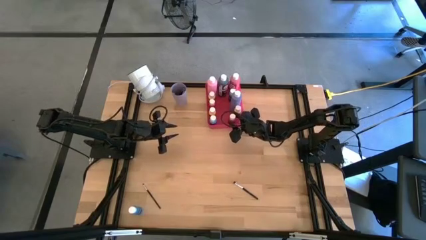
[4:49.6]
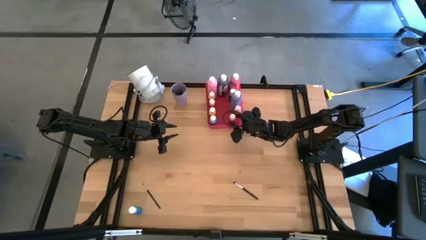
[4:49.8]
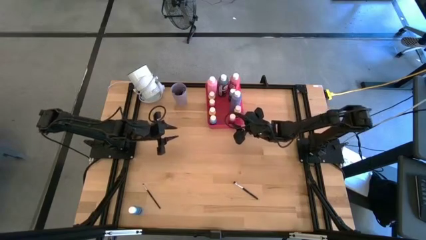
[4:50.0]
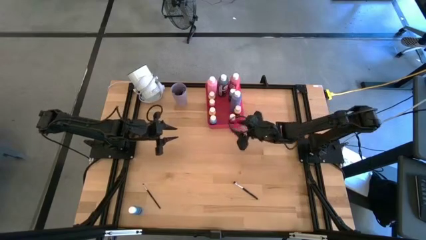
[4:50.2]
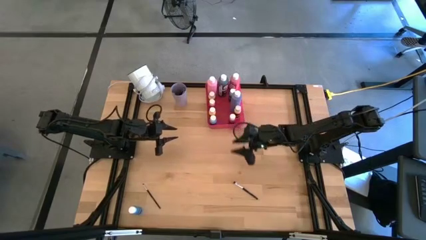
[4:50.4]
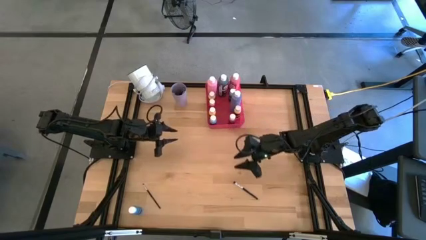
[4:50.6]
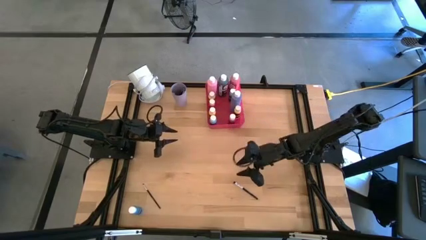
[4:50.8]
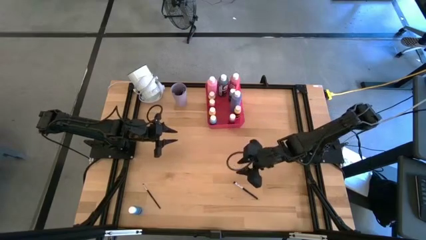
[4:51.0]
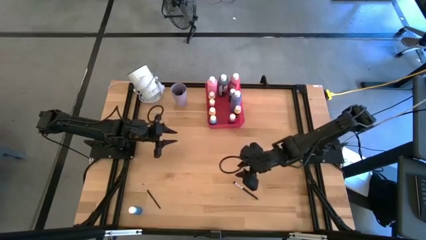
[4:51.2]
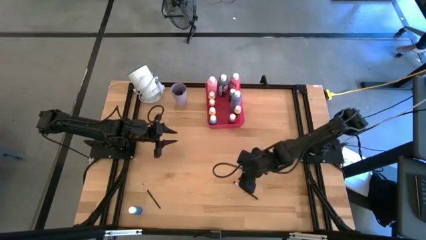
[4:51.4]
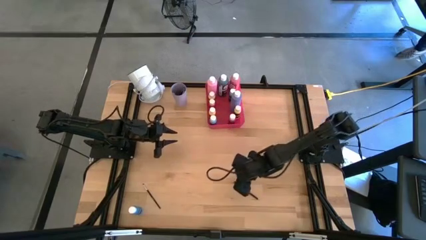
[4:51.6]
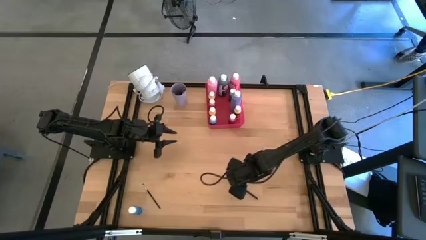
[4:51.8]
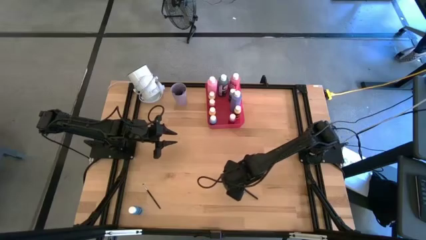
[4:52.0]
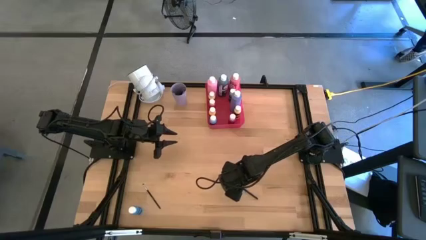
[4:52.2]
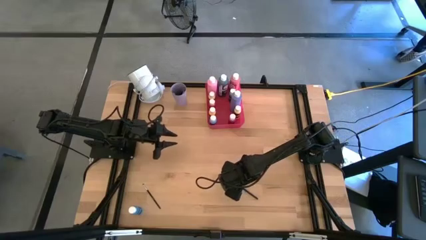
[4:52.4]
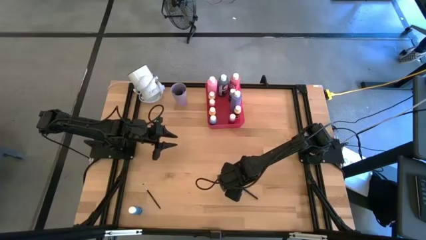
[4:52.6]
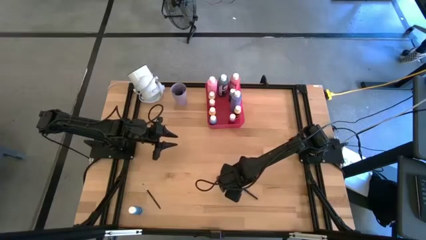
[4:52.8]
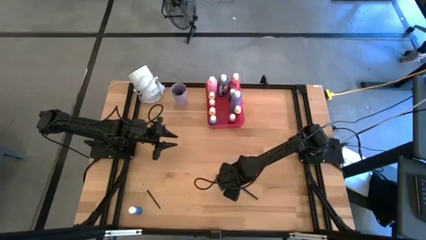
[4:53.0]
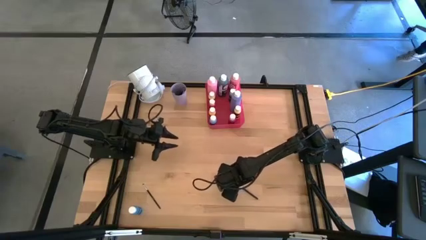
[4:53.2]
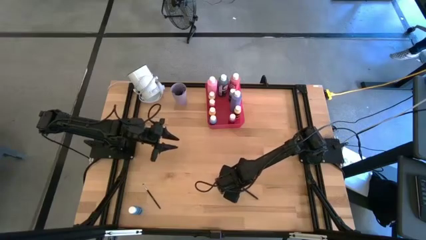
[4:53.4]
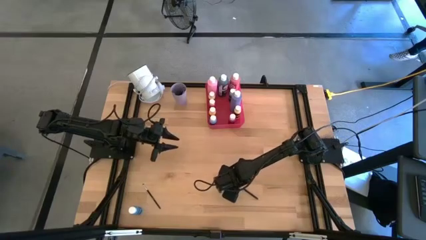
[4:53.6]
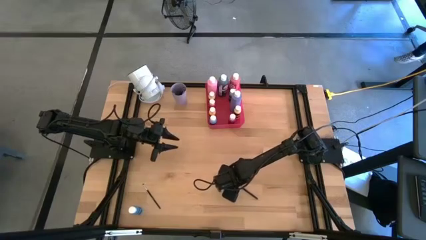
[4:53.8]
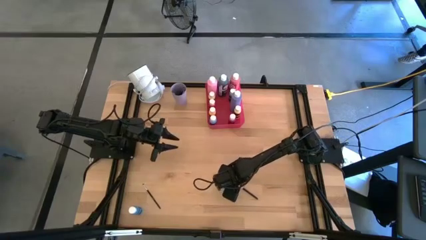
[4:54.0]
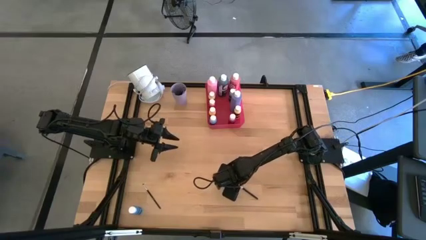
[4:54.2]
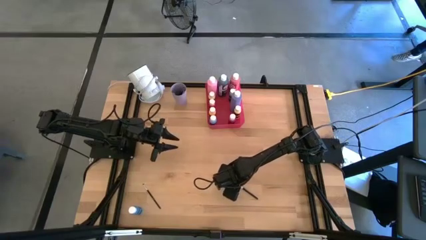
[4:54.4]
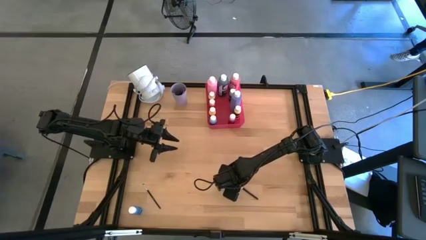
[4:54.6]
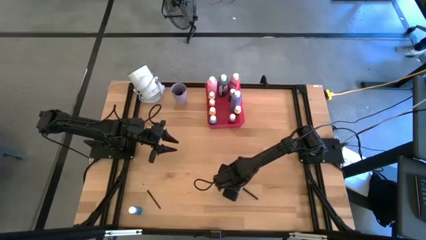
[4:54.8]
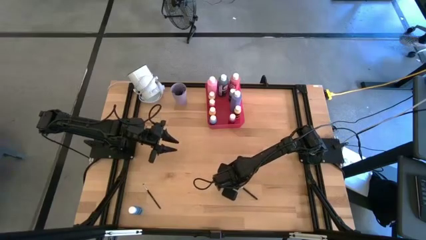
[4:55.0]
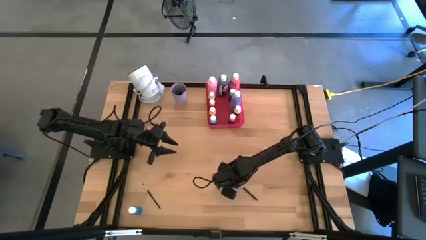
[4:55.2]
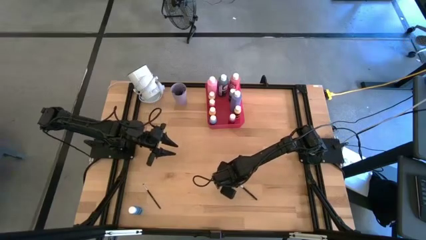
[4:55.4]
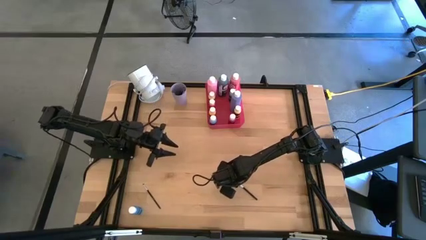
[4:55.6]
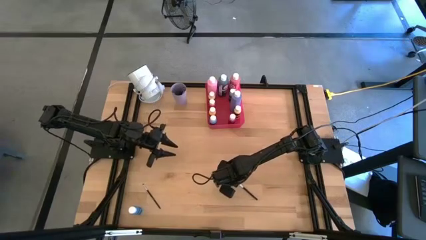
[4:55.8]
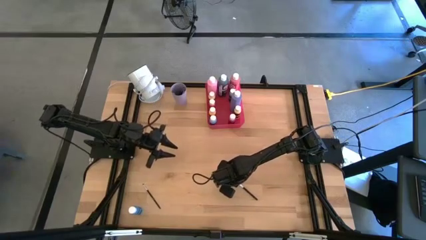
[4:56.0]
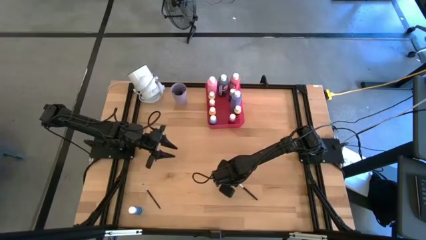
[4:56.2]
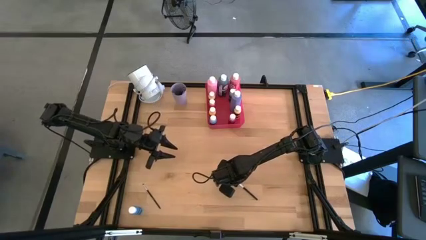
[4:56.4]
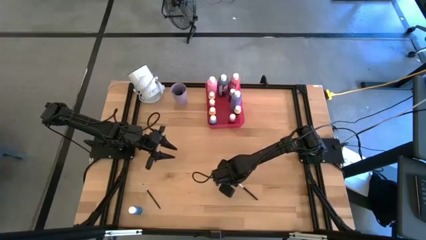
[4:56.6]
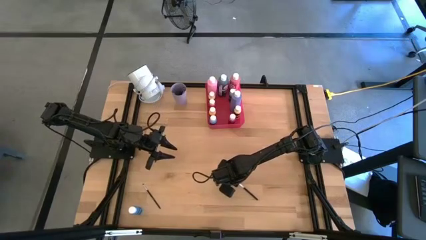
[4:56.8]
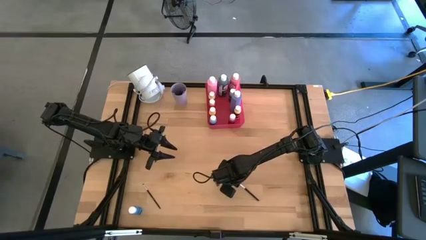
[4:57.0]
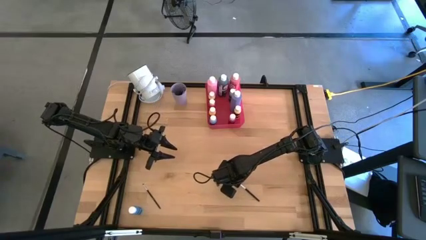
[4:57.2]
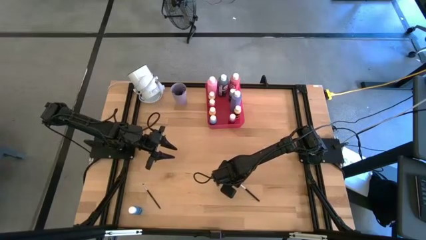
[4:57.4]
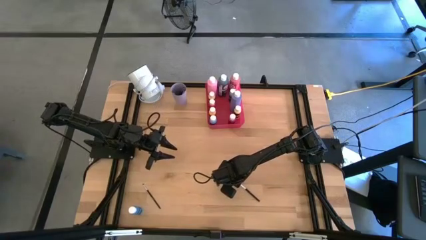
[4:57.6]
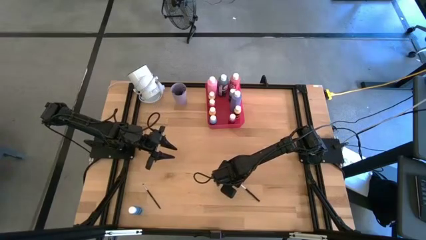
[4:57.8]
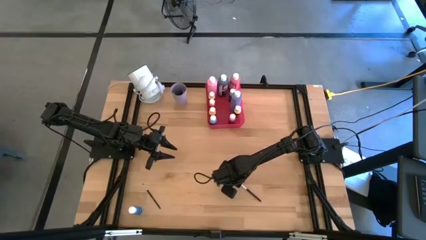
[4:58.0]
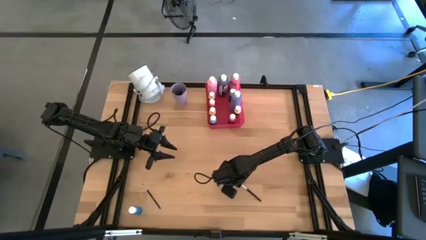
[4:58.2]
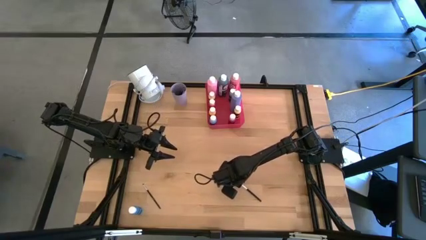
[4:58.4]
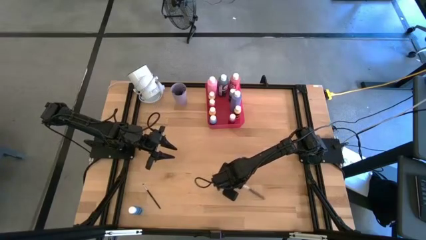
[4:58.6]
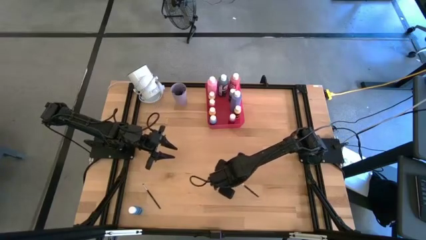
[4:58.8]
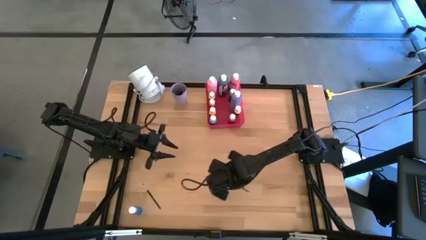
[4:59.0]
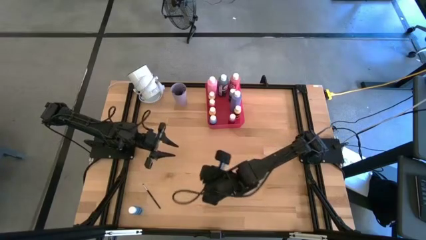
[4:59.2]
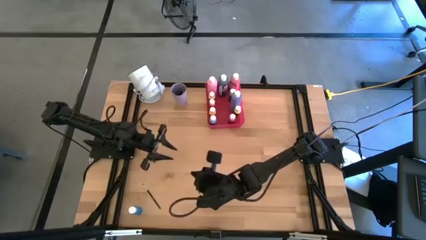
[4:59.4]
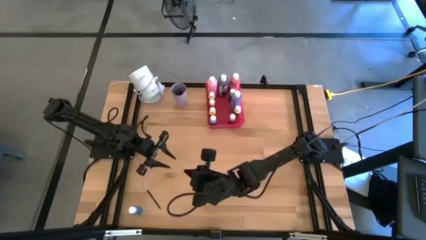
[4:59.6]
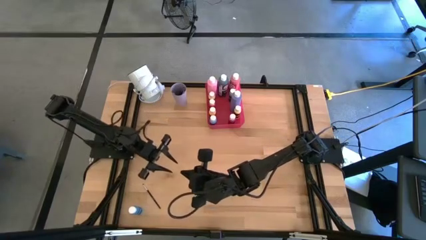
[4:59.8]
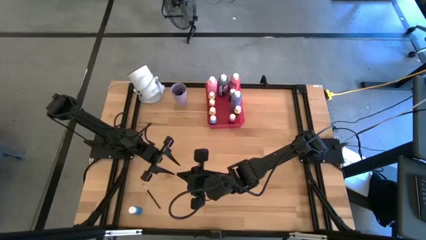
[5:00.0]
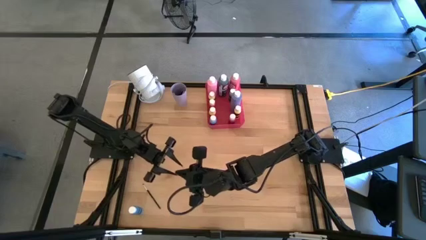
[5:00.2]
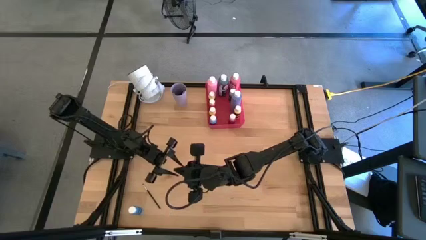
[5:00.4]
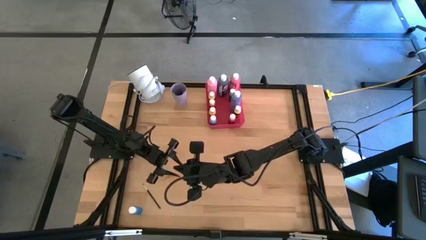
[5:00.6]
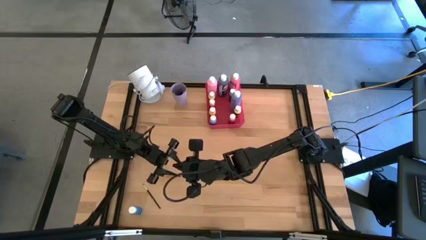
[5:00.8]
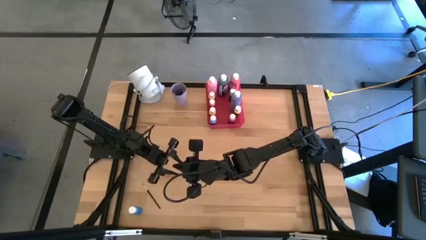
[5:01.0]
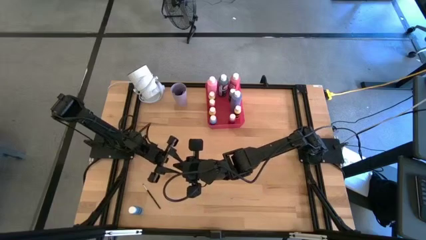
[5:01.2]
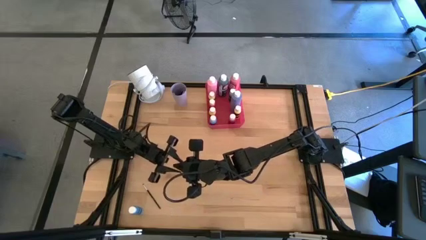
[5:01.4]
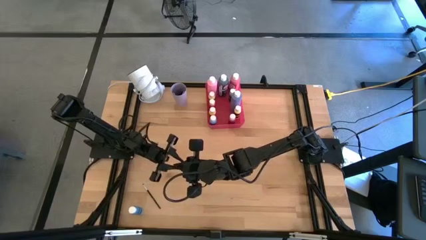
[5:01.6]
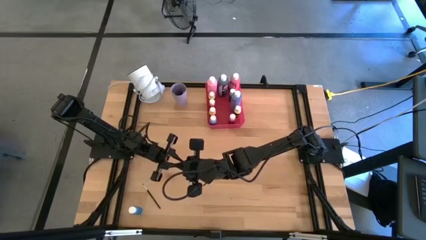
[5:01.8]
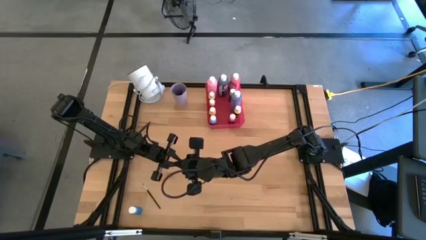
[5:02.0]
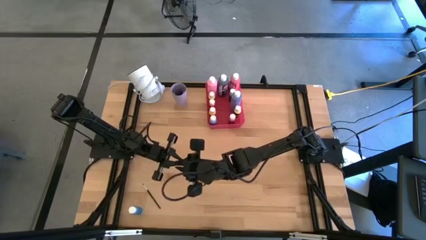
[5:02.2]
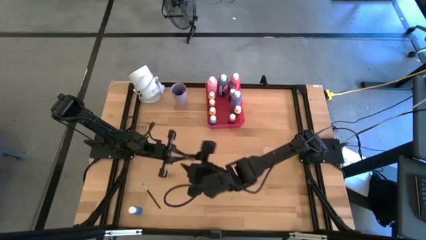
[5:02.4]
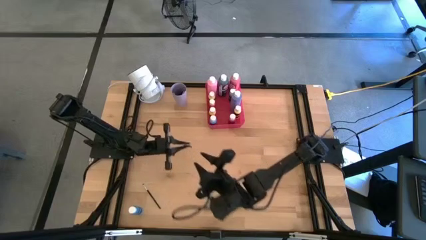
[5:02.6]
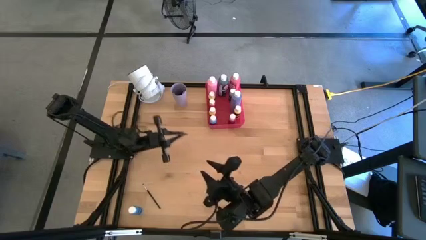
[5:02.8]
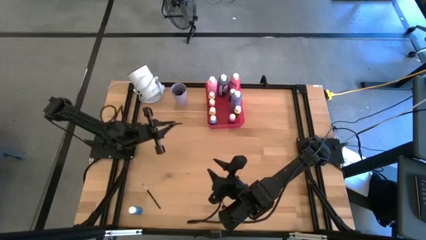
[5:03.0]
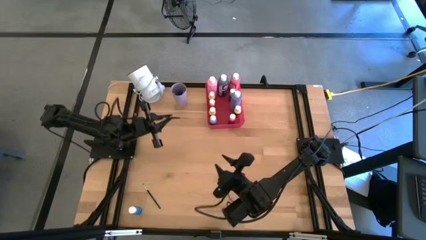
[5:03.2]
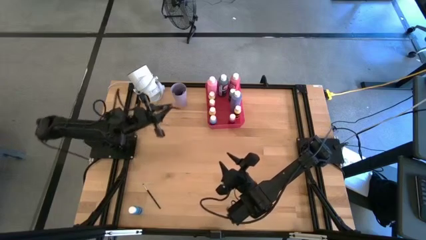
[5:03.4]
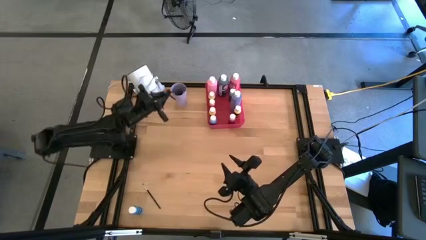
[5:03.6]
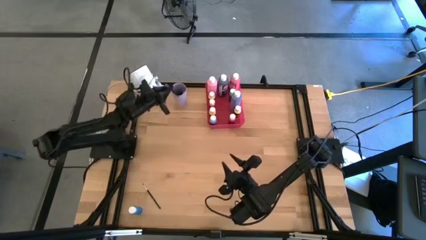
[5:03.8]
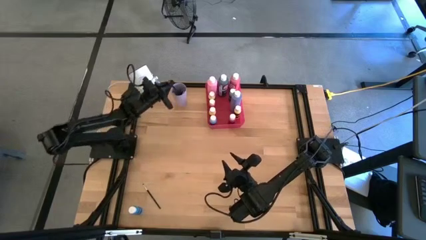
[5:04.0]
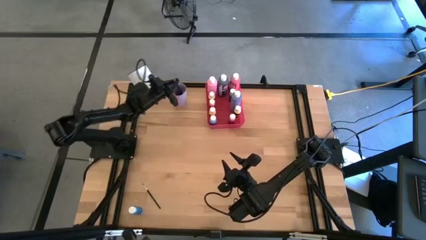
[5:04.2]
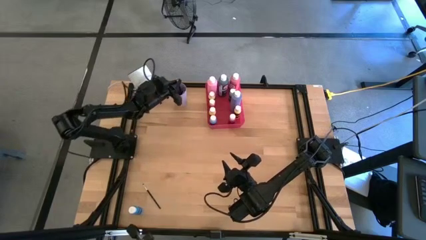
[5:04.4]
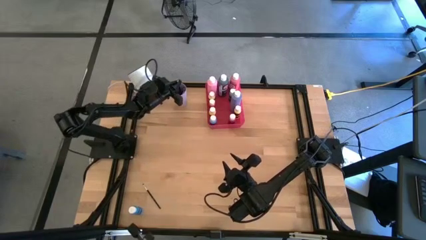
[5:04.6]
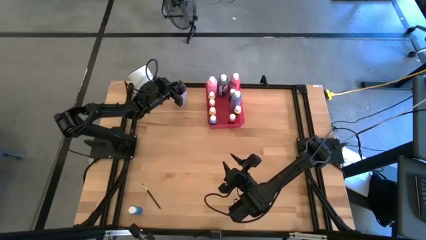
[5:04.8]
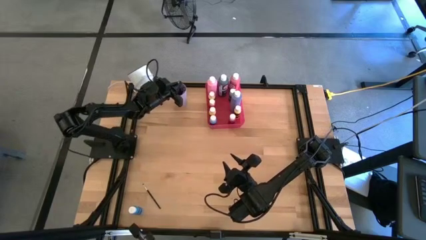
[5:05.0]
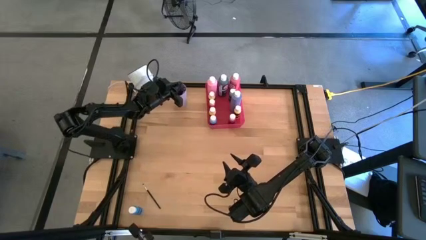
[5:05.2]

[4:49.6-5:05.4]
Task: Pick & Place Paint Supplies
Put the black paint brush into the purple cup
